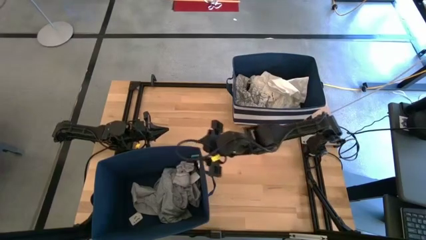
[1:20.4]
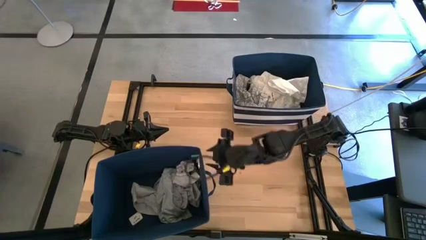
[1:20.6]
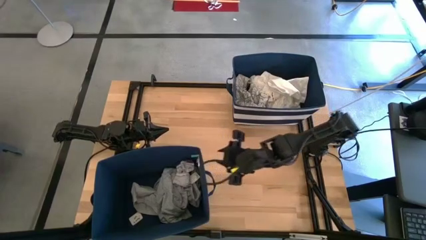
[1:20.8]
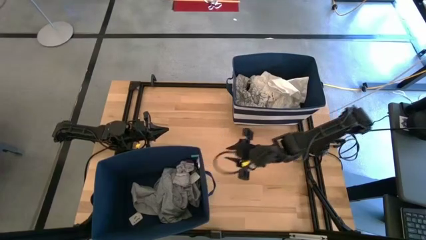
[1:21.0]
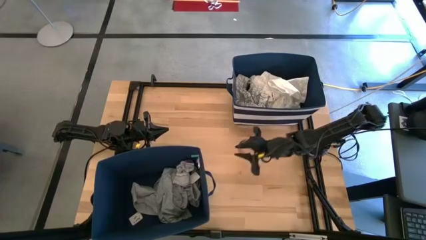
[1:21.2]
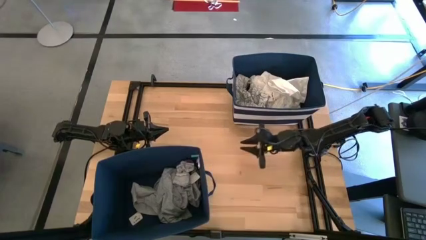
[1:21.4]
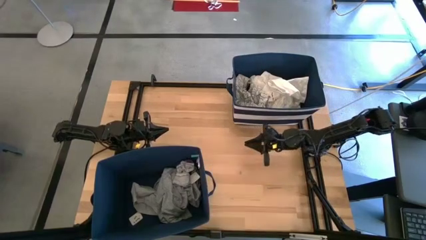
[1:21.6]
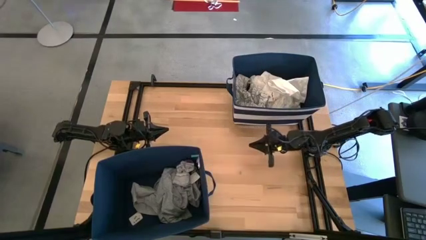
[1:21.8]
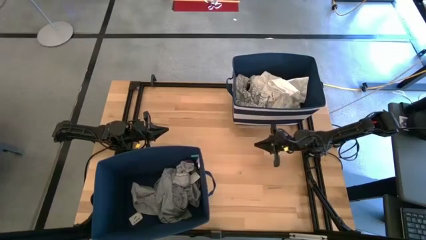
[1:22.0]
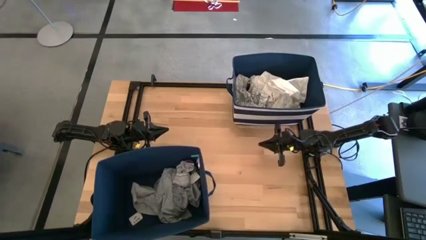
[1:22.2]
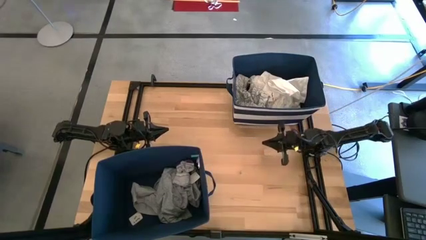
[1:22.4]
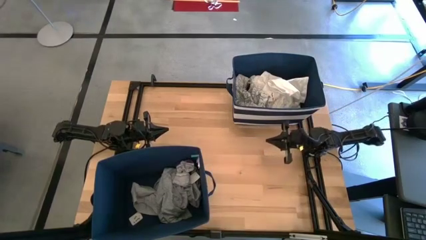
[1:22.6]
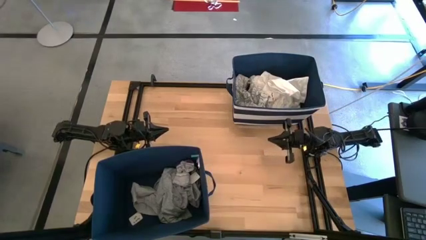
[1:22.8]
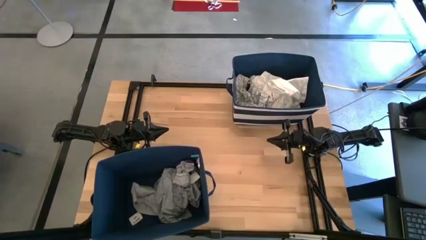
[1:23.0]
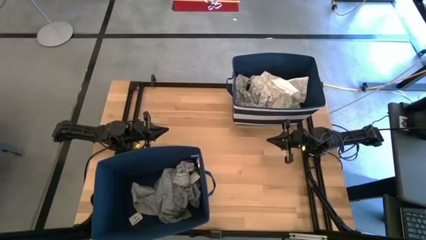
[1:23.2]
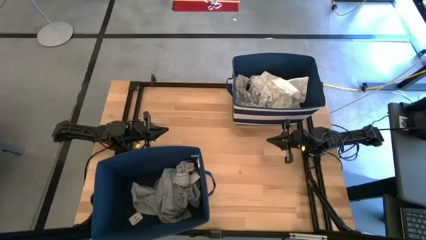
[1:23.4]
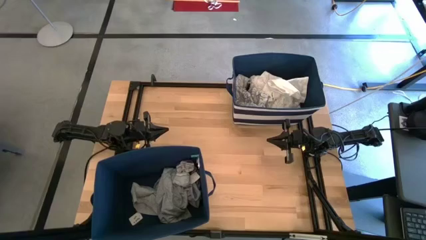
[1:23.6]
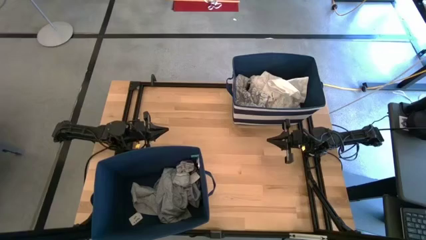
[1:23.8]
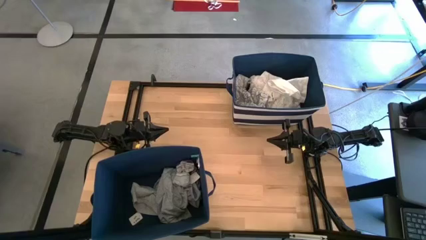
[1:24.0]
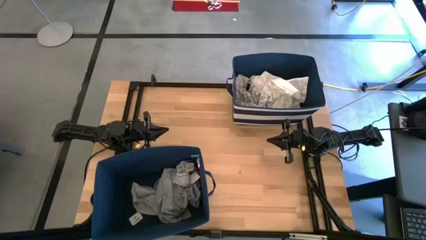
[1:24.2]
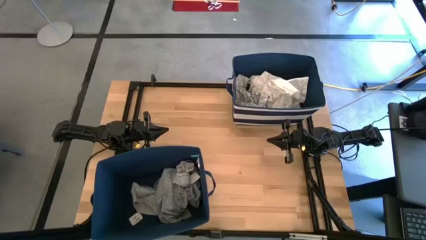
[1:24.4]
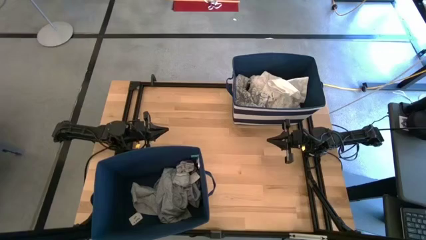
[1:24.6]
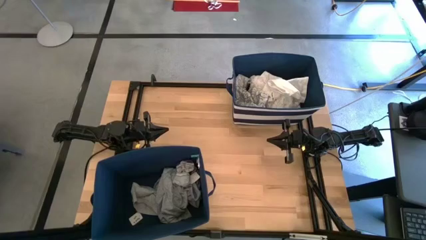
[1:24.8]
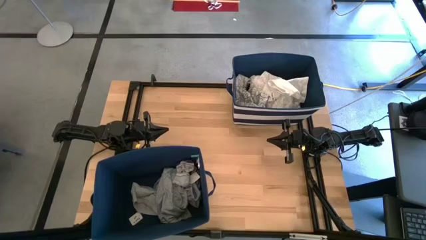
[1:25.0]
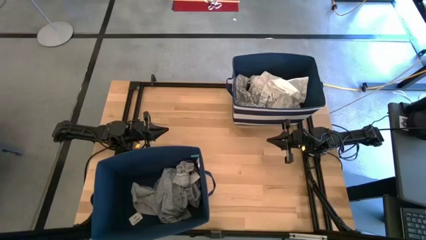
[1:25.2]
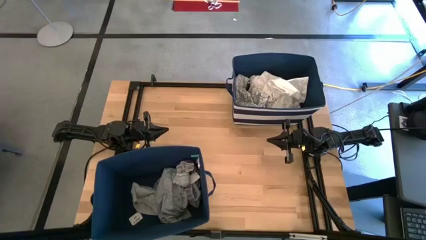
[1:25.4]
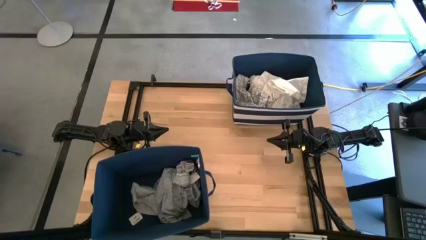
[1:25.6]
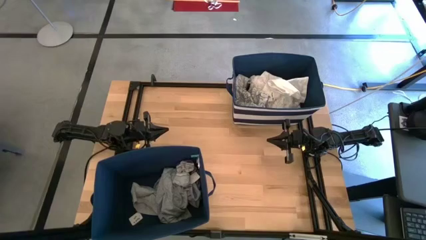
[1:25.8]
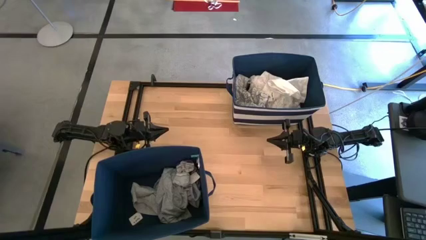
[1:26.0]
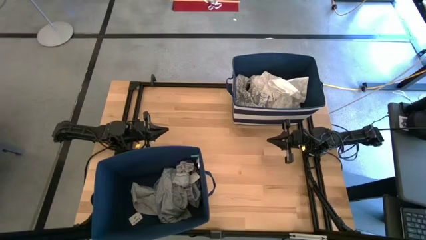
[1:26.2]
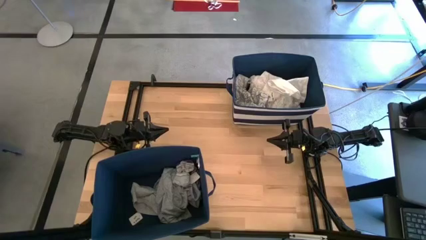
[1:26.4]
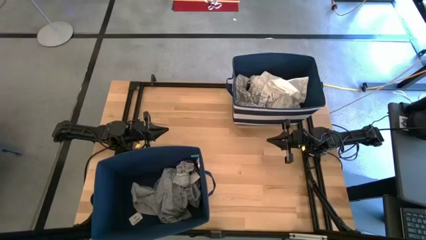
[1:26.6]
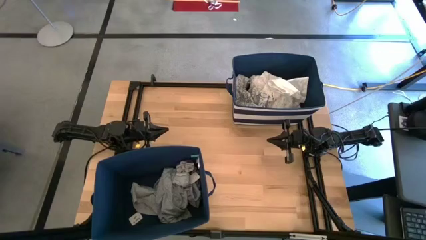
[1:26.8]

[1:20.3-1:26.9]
Task: Sort clothes
Return to Home Position

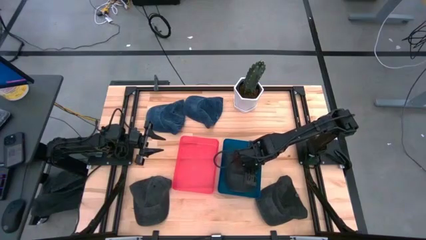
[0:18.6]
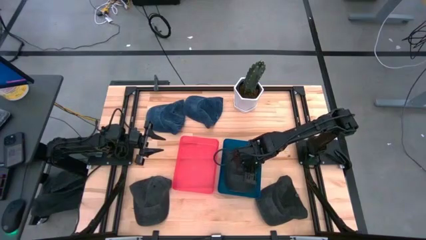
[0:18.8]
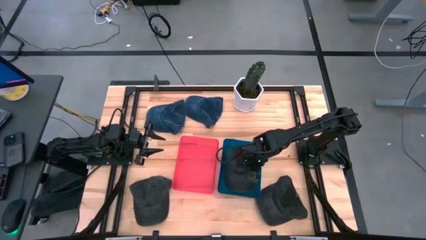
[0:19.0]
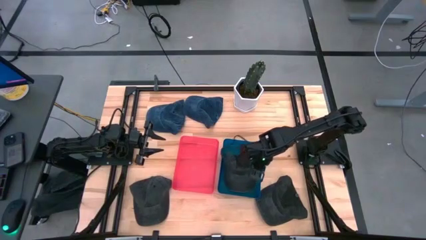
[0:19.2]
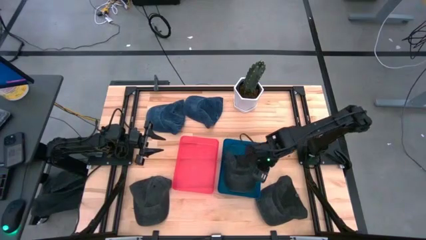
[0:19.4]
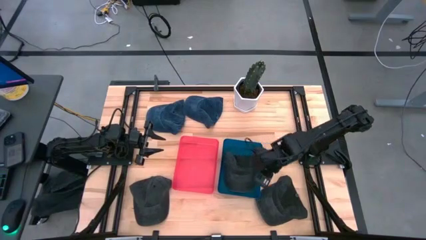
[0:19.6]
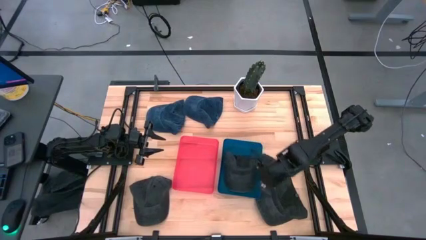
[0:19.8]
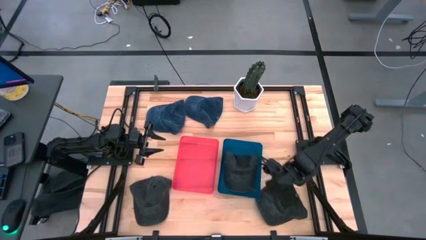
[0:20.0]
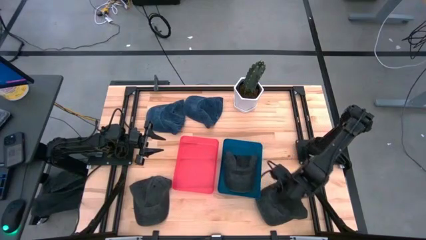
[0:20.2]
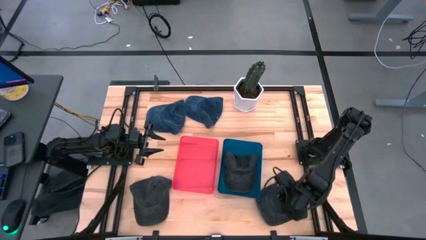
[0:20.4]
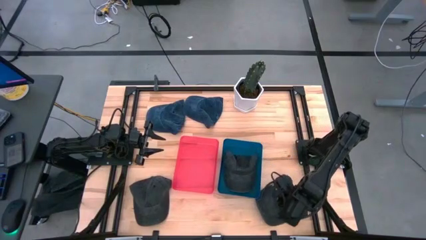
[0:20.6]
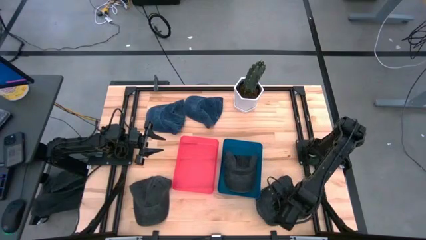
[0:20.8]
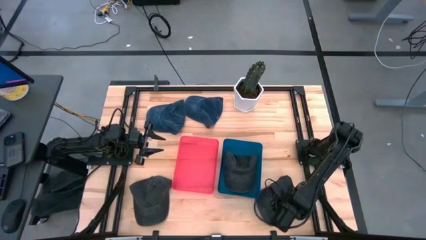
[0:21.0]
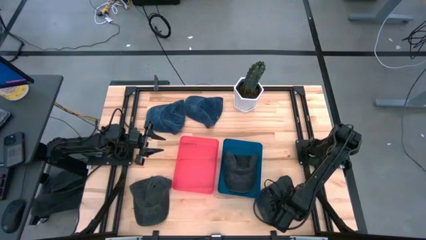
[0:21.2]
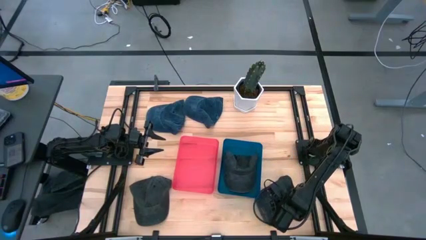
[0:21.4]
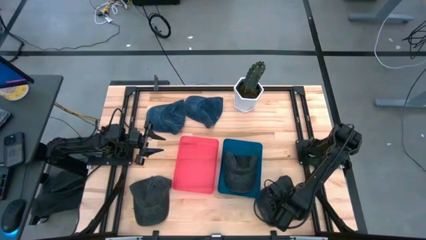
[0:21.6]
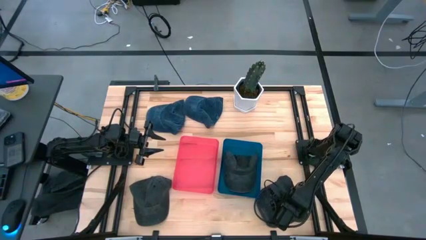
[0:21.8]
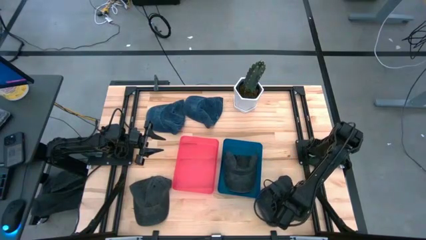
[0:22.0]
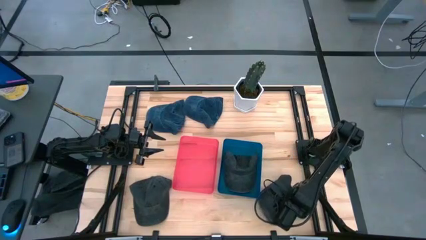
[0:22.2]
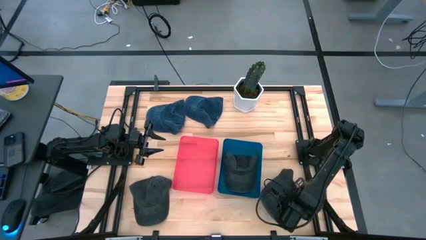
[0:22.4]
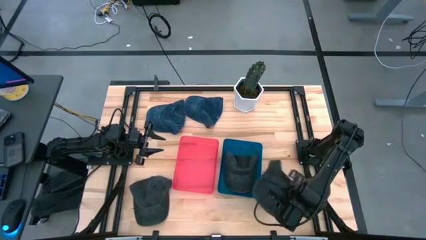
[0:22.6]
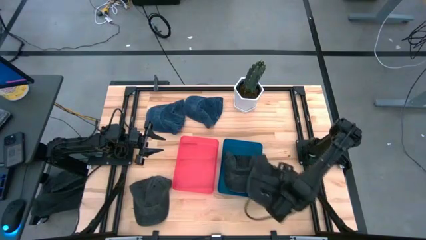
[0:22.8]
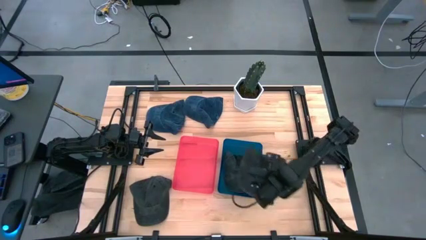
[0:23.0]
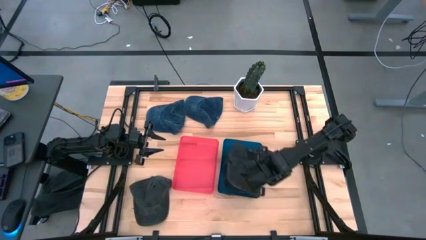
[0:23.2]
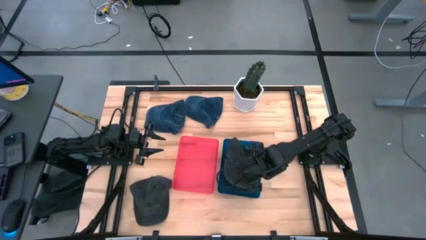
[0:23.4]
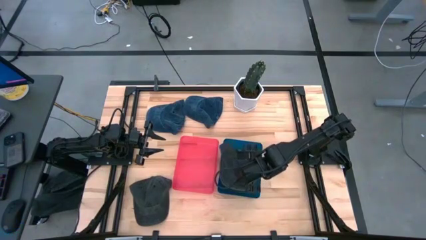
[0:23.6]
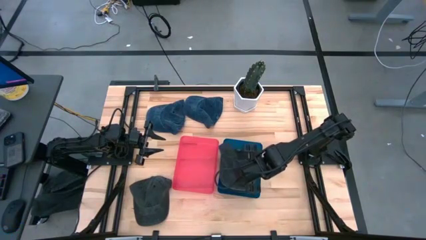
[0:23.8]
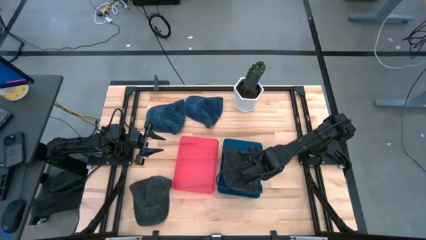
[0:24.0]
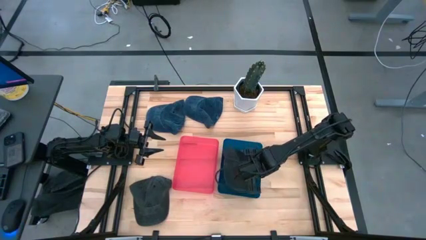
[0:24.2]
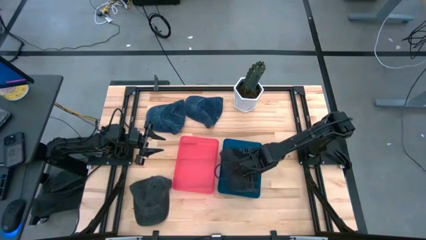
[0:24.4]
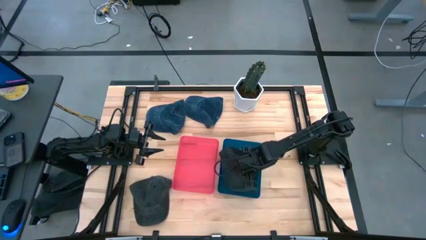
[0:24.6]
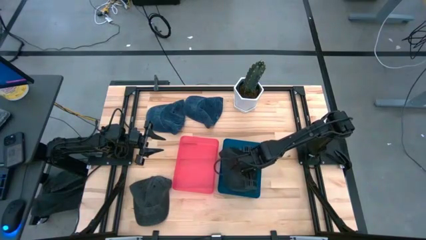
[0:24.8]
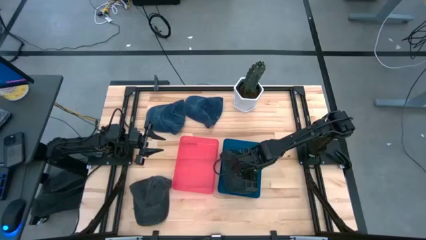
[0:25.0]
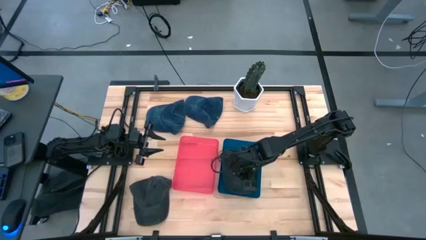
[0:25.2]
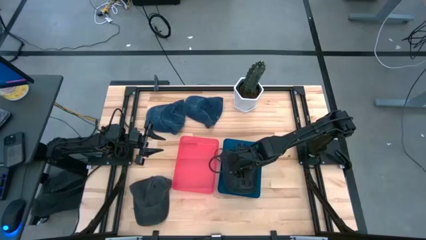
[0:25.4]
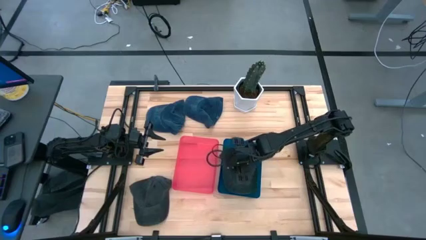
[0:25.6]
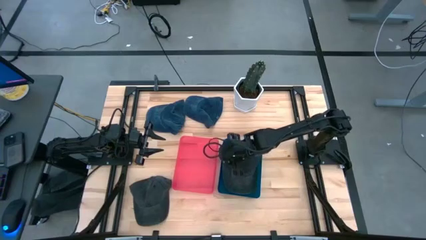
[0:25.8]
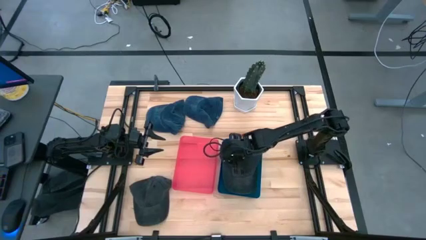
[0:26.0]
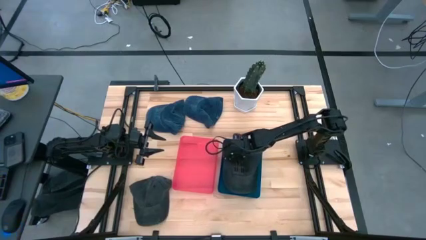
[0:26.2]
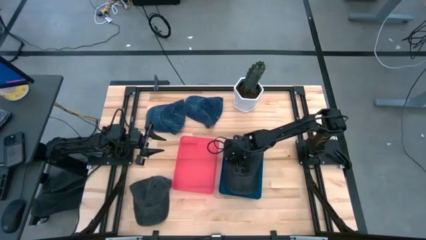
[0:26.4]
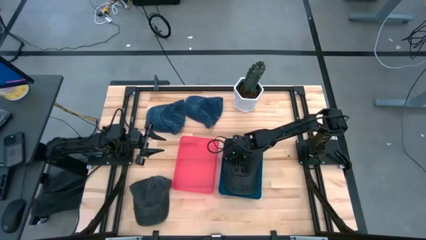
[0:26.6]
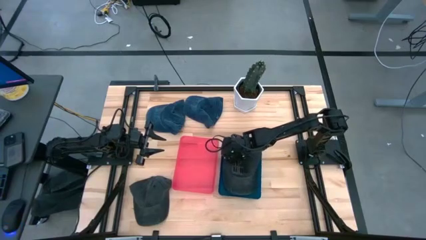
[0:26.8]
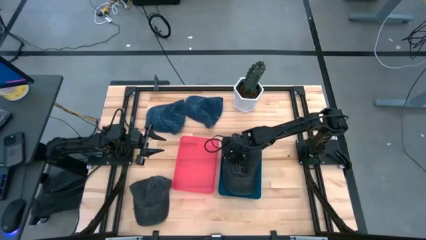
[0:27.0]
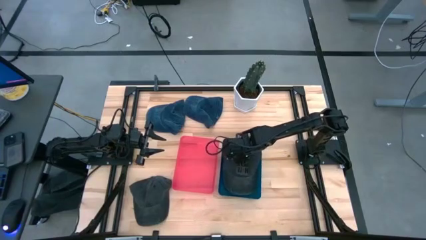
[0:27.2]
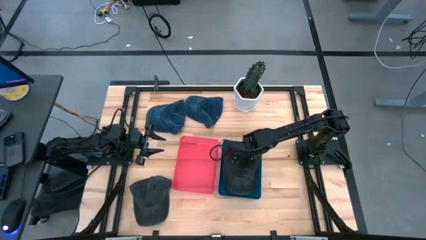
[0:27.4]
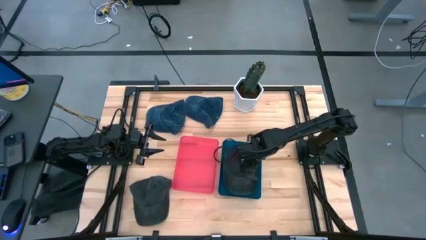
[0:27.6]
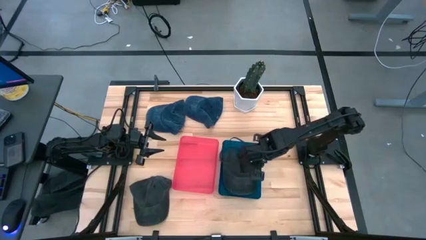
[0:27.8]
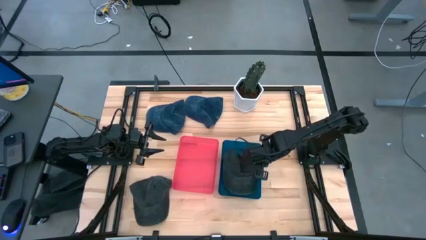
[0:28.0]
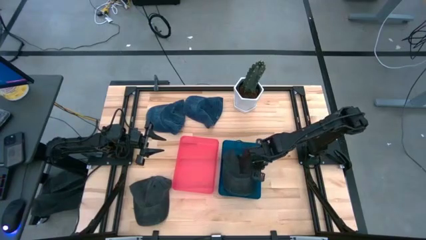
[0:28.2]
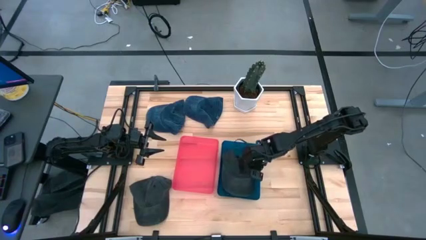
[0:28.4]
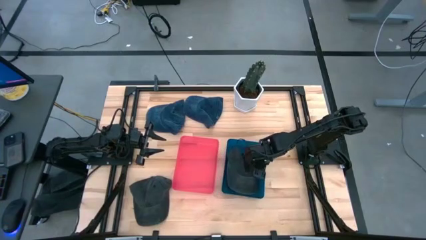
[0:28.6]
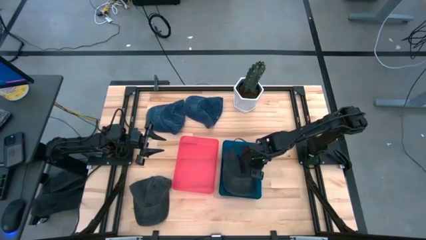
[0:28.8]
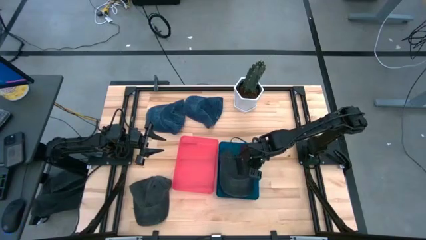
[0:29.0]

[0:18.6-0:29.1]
Task: Pick & Place hat
Put the right black cap into the blue bin
